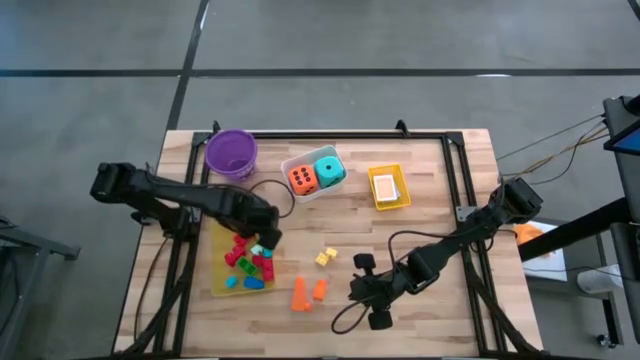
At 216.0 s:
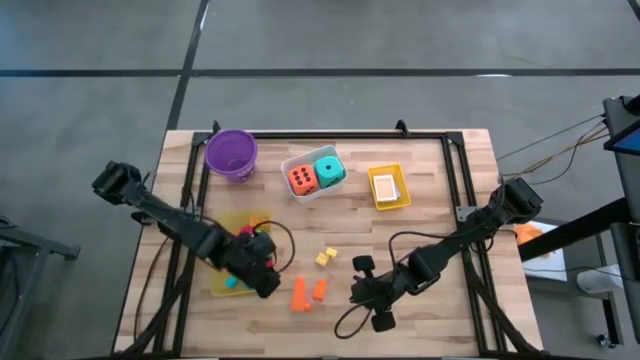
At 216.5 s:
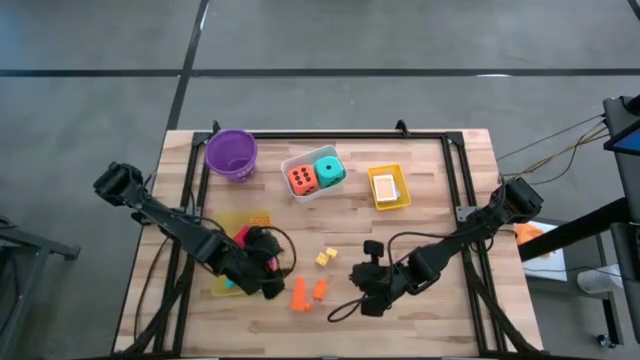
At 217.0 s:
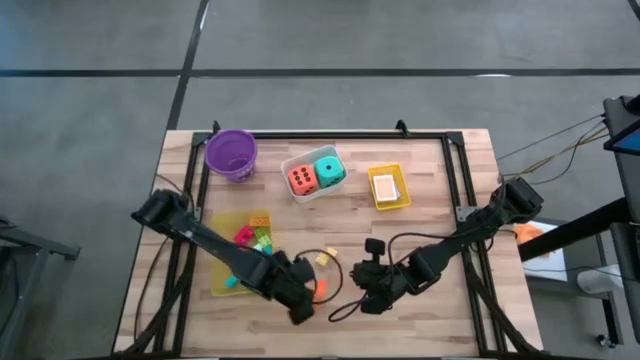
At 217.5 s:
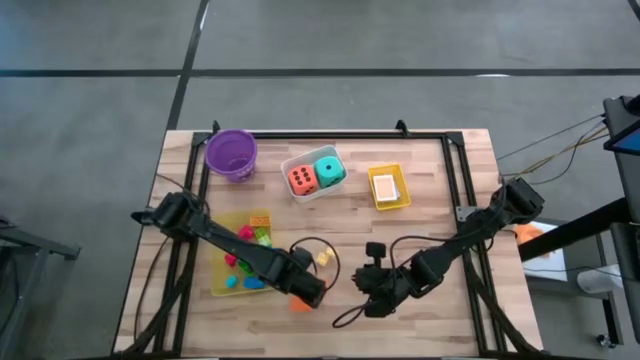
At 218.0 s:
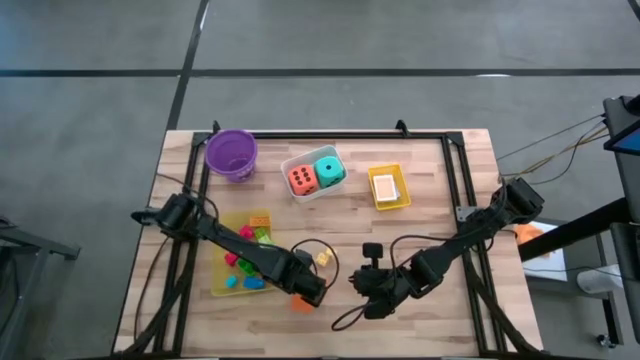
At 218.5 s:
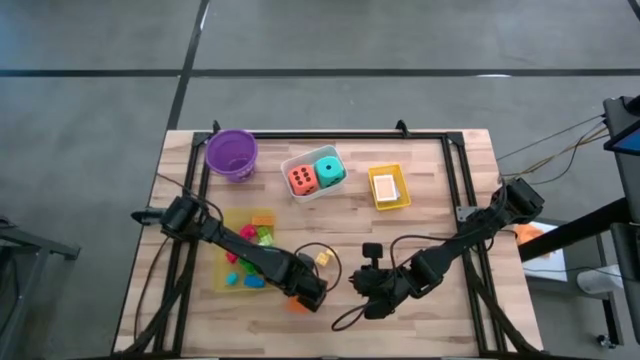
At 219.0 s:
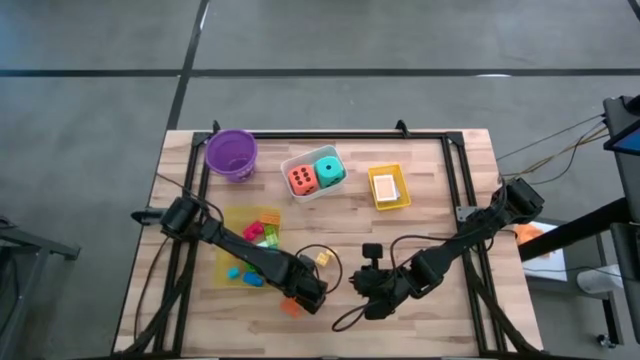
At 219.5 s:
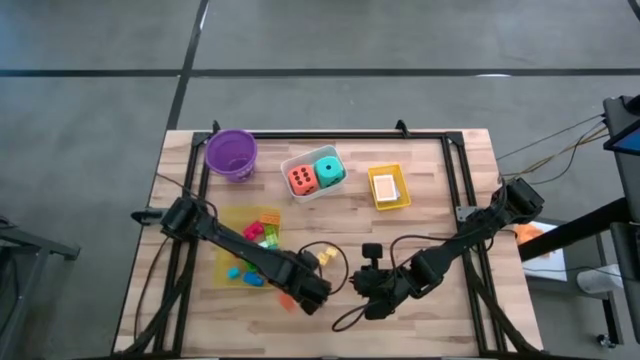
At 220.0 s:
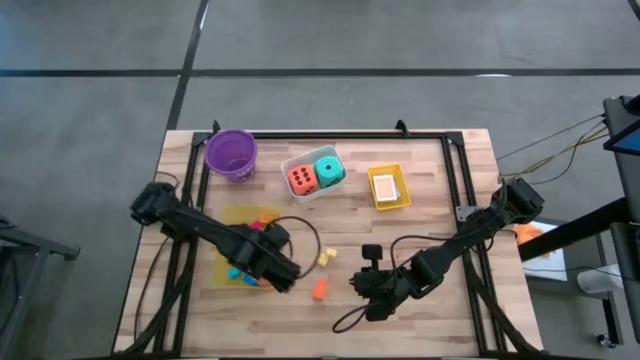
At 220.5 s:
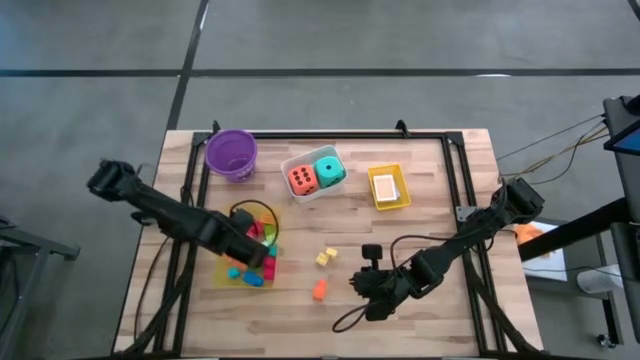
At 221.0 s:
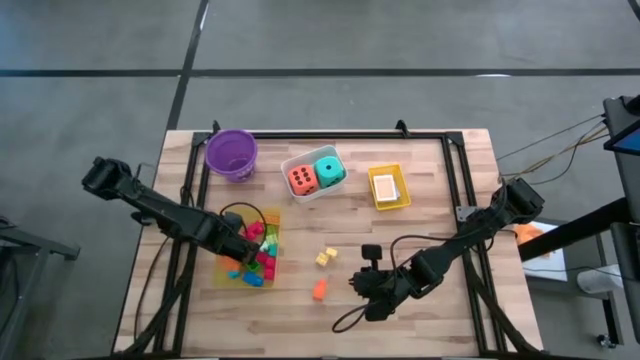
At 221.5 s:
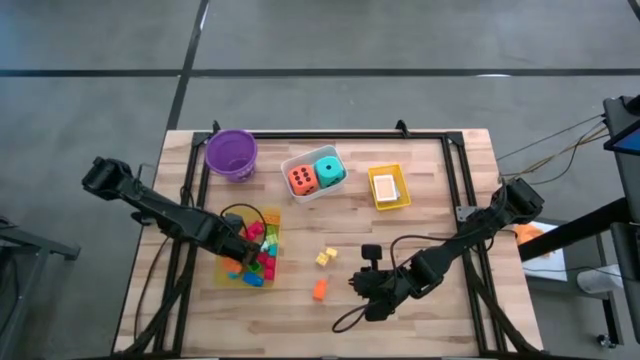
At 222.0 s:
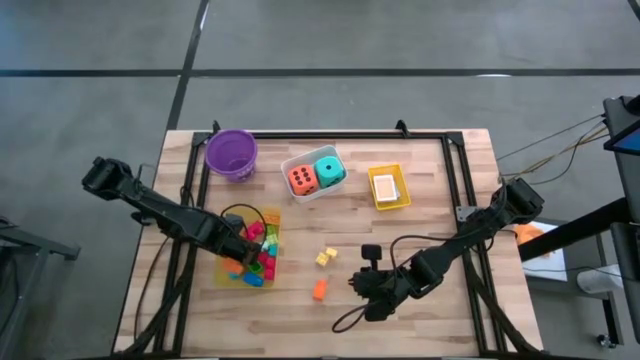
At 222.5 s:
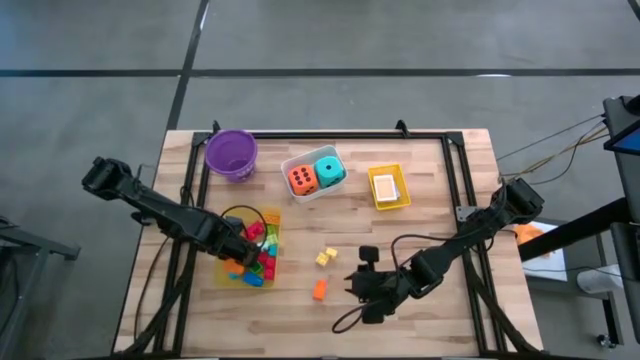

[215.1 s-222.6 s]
Task: Pick & Place Toys
Put the orange game piece into the light yellow bin

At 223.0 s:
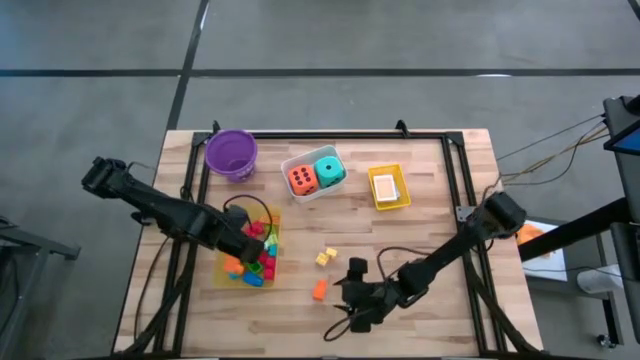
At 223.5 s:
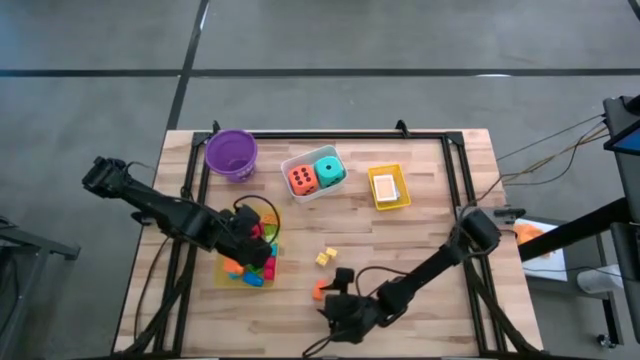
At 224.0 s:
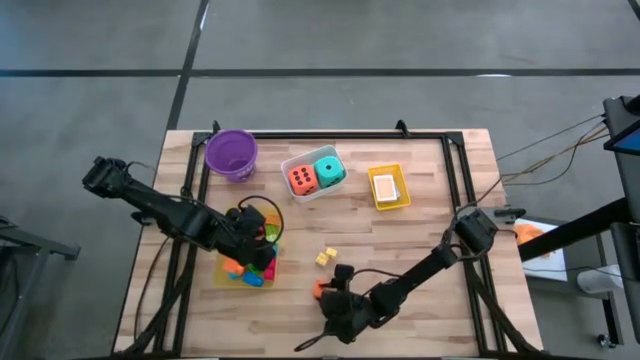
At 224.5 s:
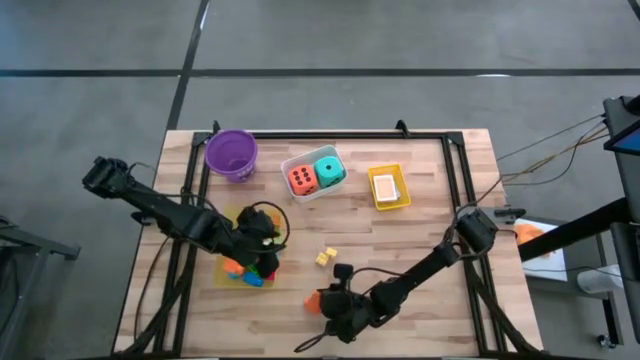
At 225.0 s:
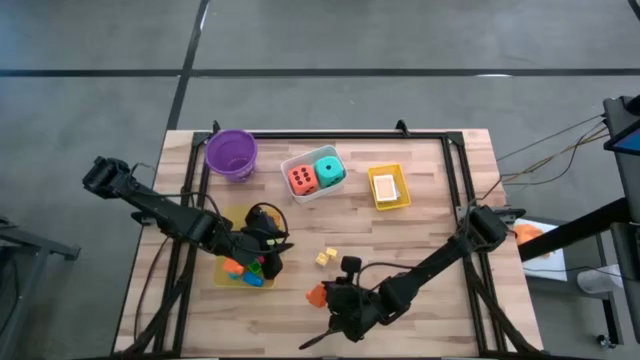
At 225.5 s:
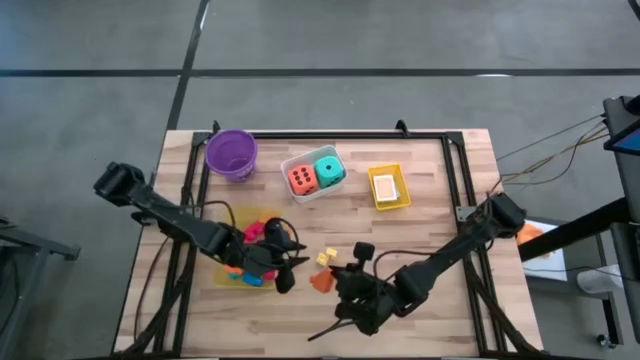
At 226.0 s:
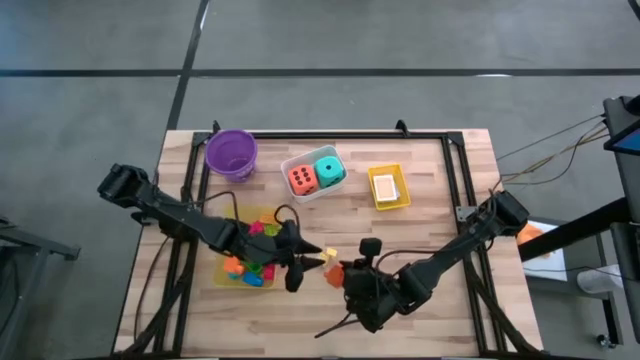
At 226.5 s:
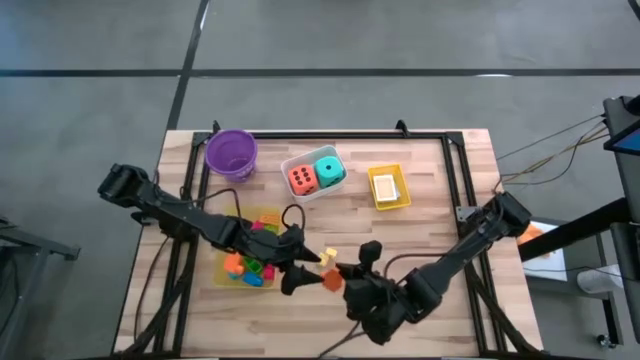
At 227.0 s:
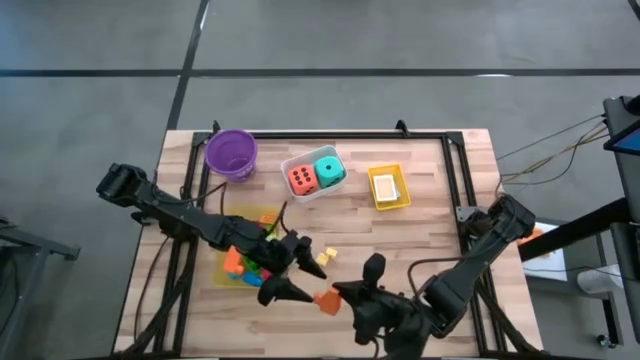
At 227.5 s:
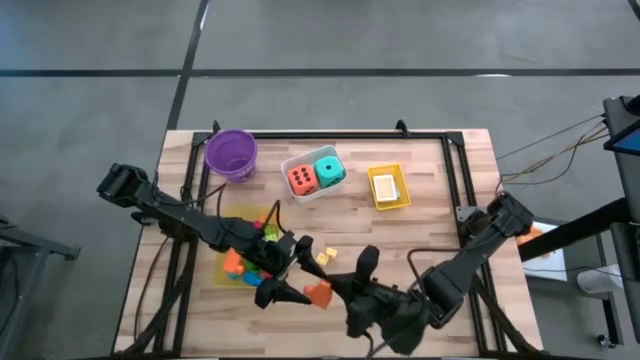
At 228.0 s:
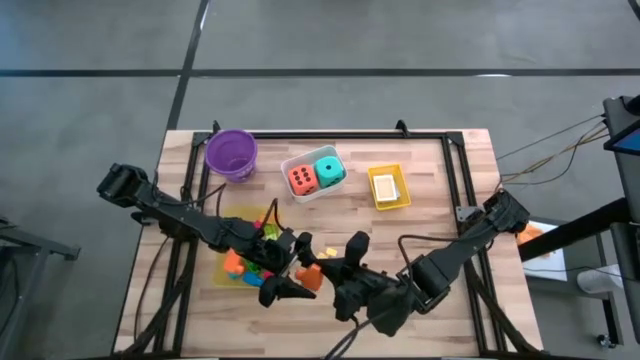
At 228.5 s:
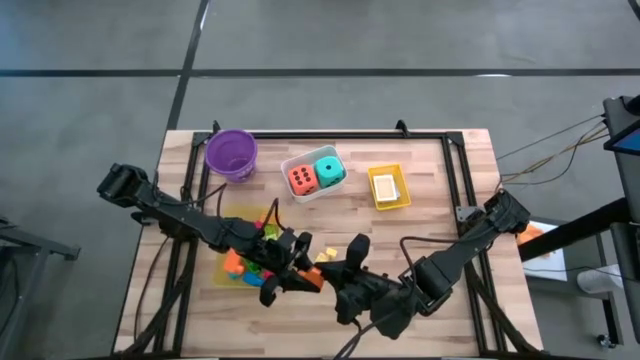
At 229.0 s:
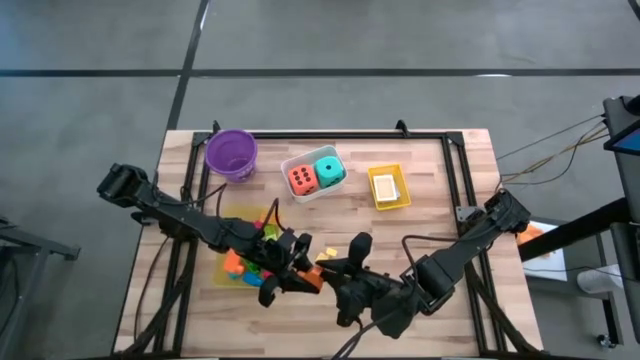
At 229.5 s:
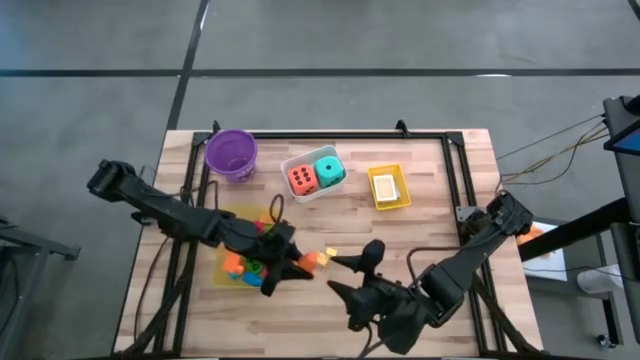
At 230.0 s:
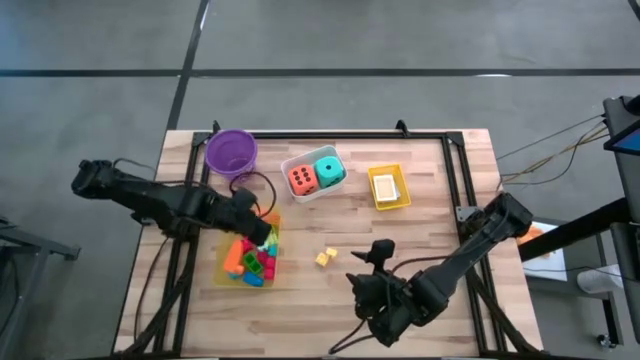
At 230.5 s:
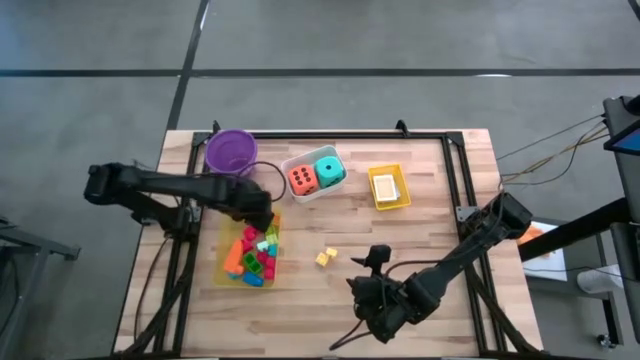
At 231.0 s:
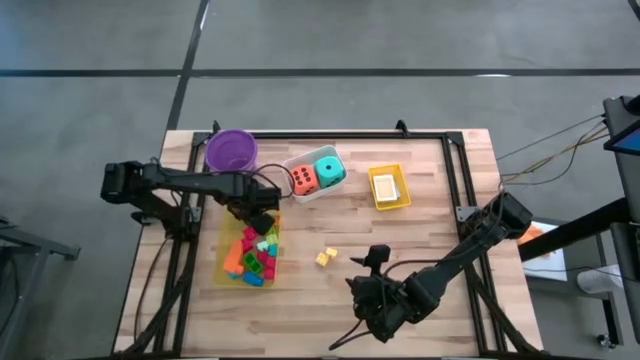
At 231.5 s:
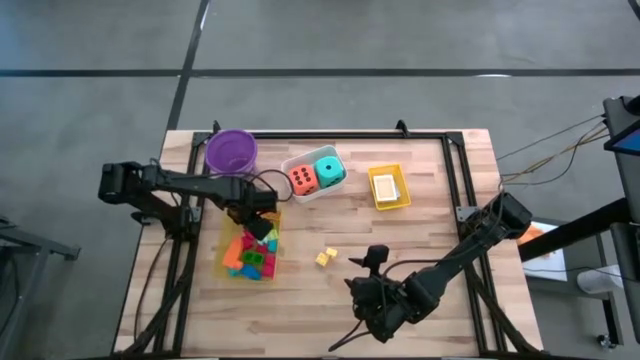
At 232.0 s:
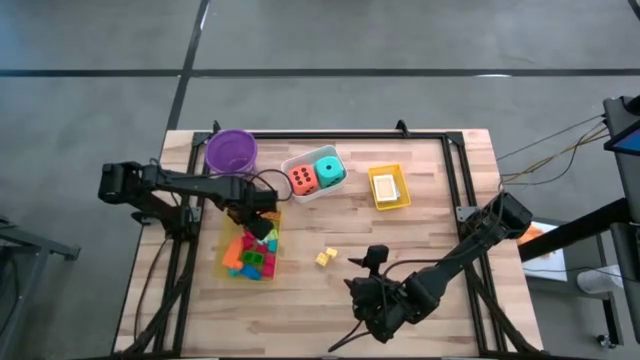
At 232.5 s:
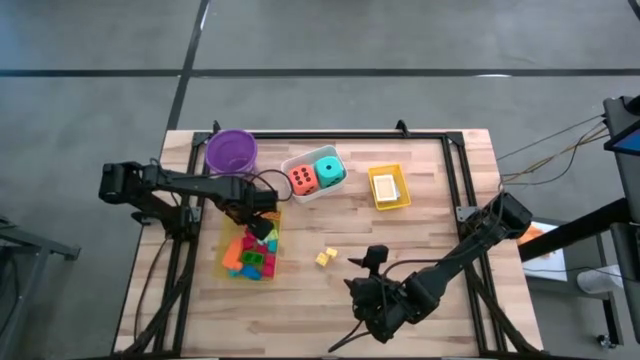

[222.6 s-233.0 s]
Put the orange game piece into the light yellow bin

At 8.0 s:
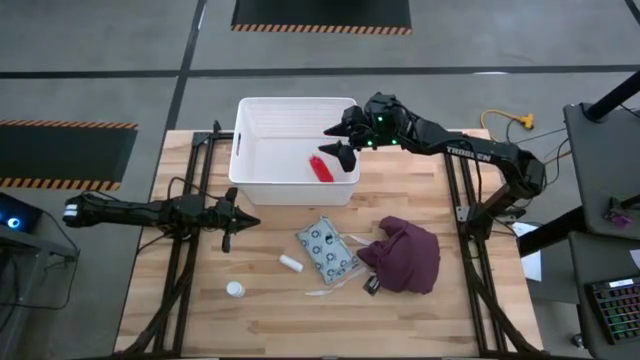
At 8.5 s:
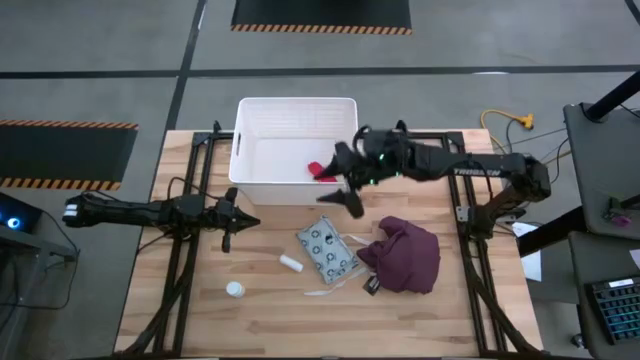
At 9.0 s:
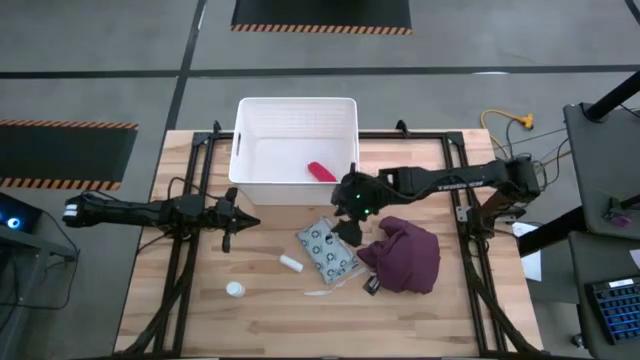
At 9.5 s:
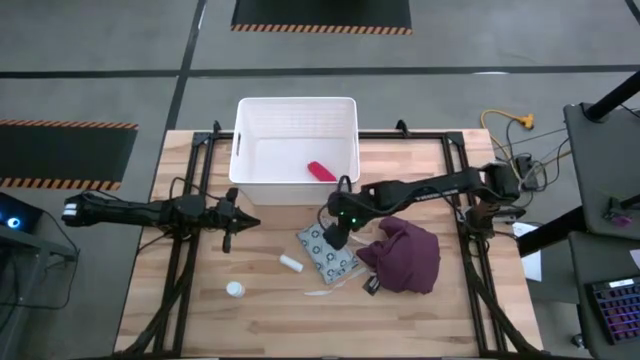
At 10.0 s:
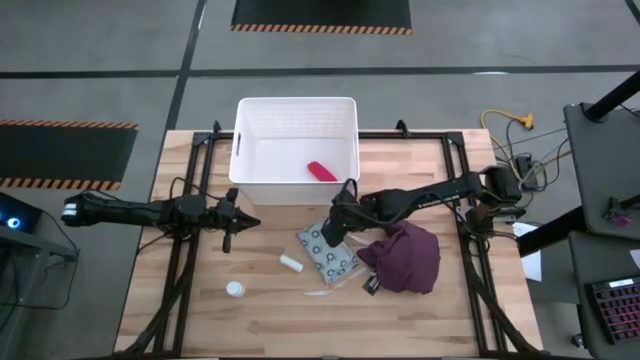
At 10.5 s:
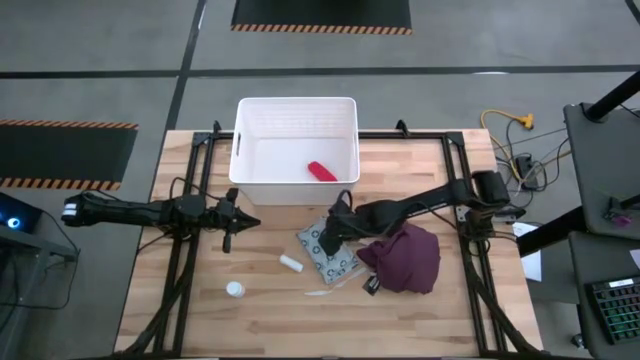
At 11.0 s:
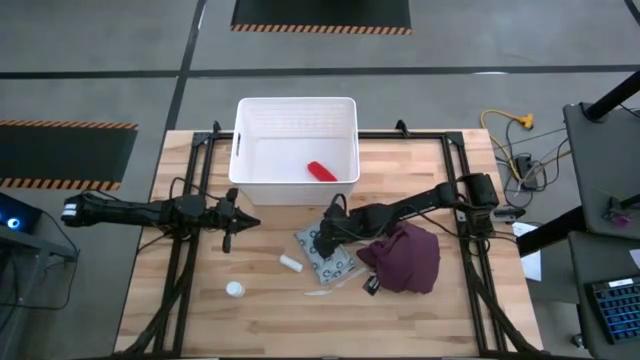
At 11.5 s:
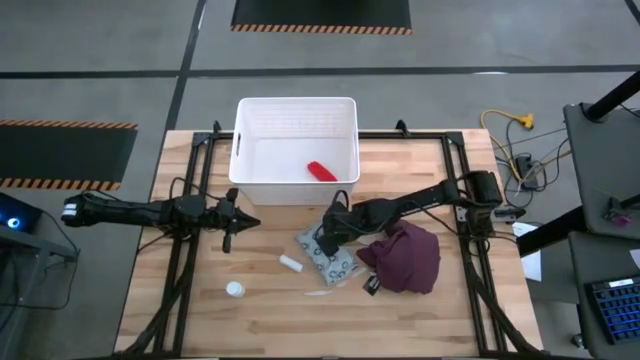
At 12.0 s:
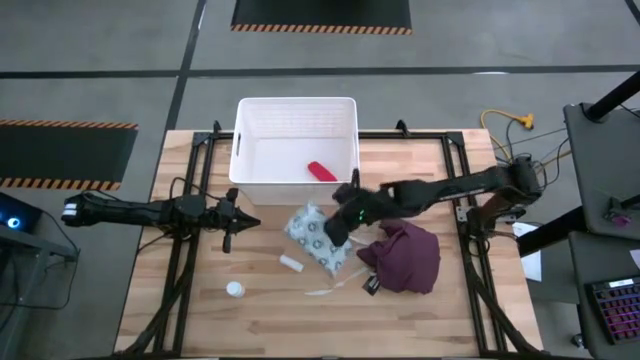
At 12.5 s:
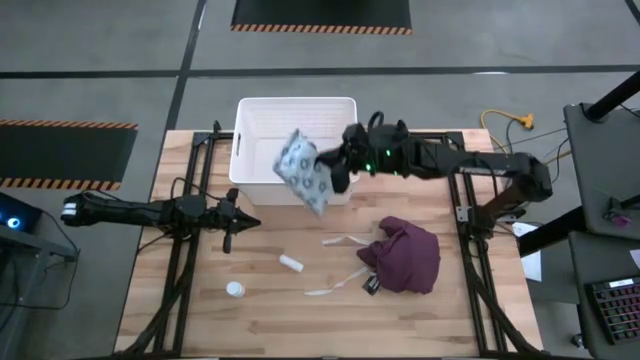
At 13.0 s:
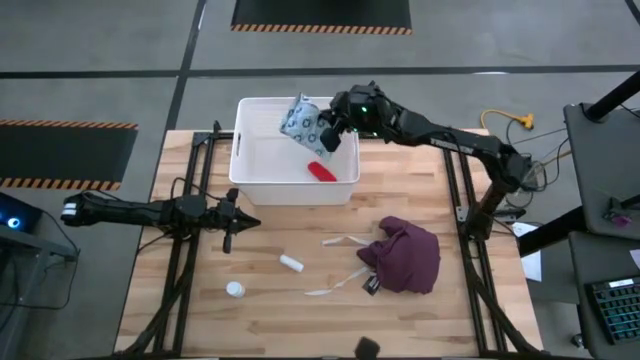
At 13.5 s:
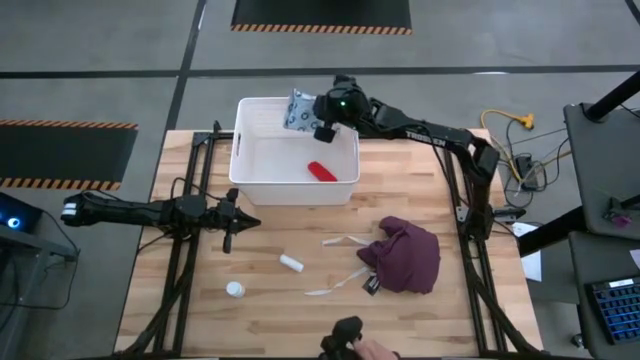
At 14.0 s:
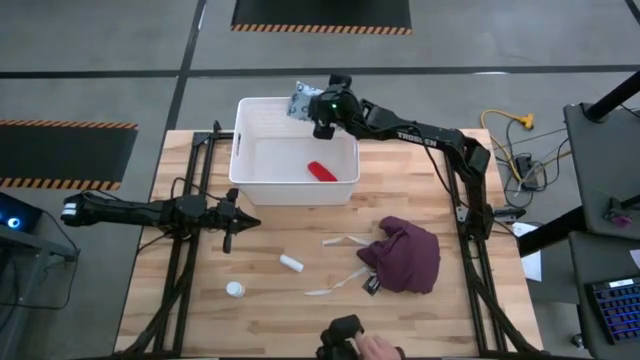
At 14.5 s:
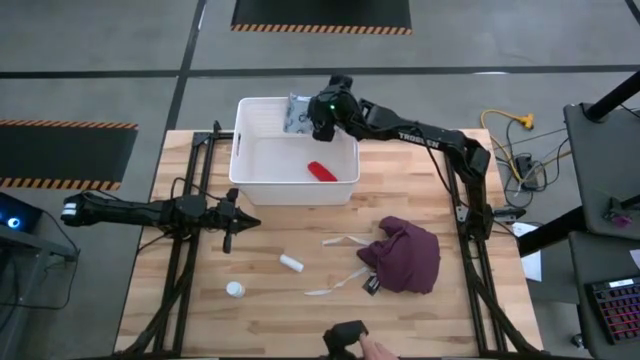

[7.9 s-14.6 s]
Task: Pick & place medical supplies in basket/bin
Put the light blue mailer bag into the white bin
